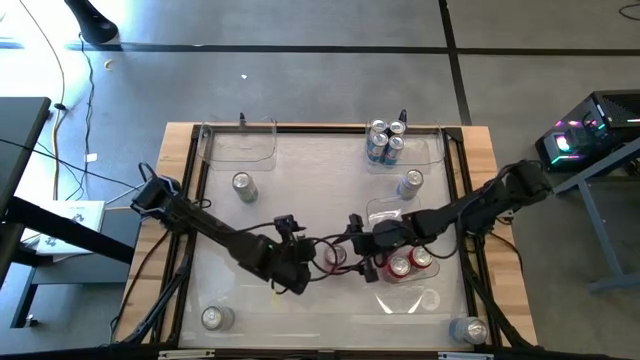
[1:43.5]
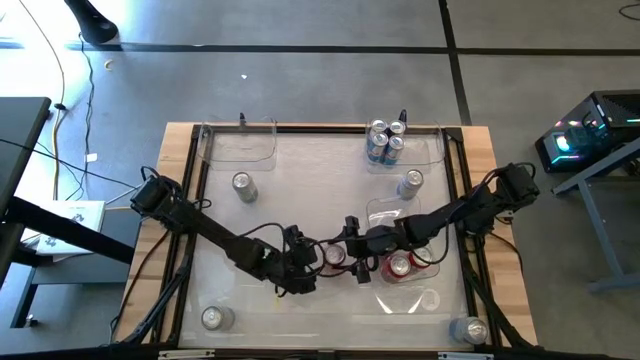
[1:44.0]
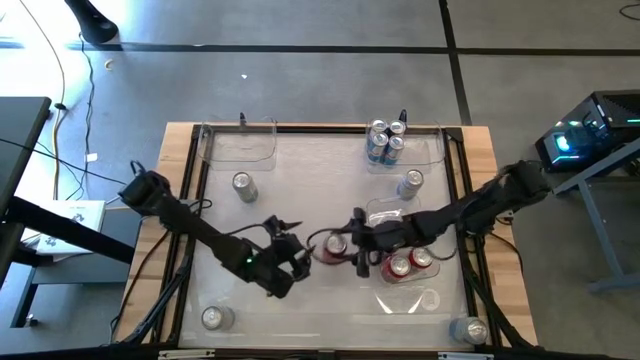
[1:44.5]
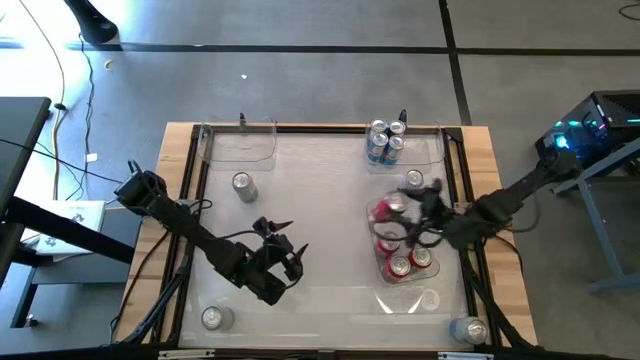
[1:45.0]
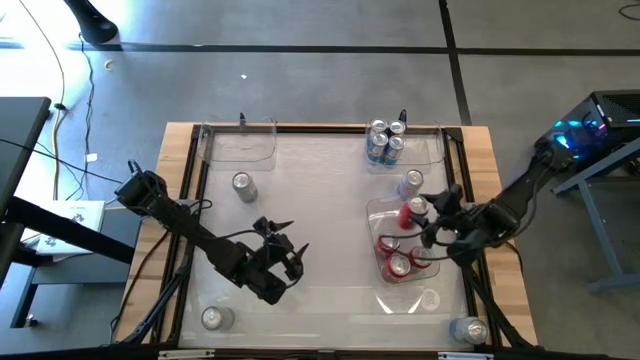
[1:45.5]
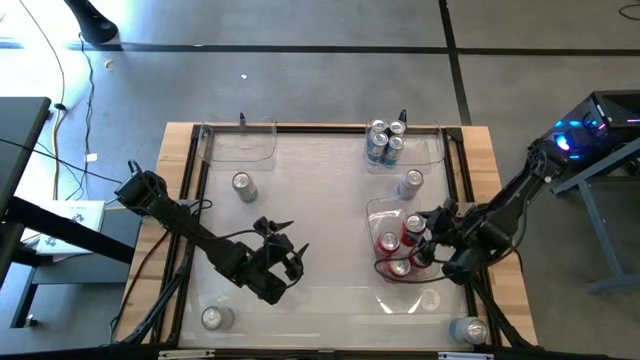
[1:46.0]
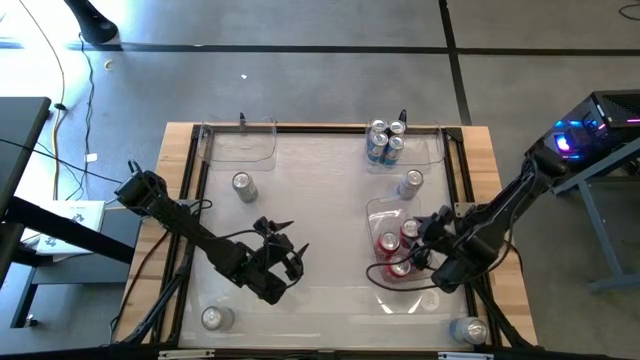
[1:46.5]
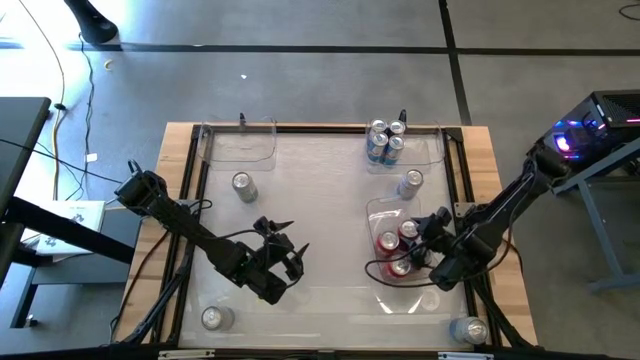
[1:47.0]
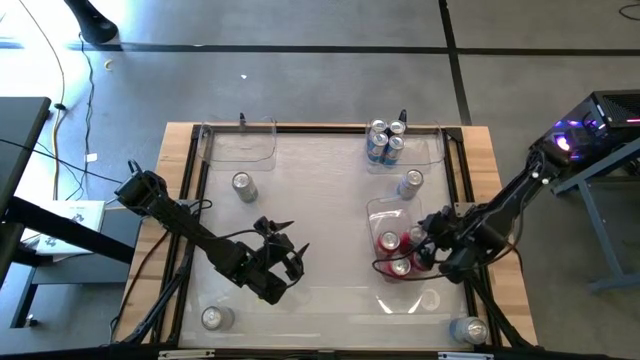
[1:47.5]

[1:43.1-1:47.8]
Task: Sort soda cans
Put the orange soda can back into the bottom right transparent bin

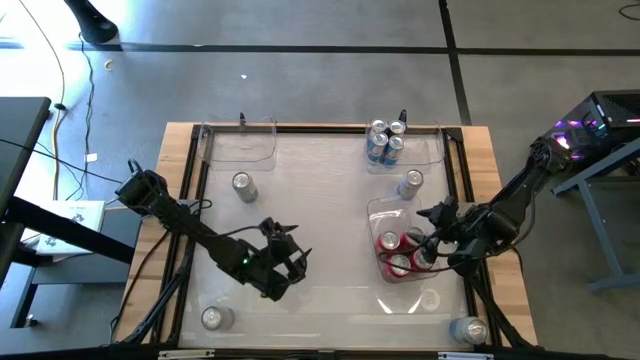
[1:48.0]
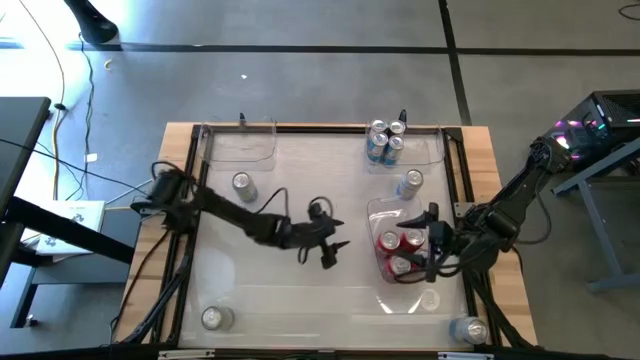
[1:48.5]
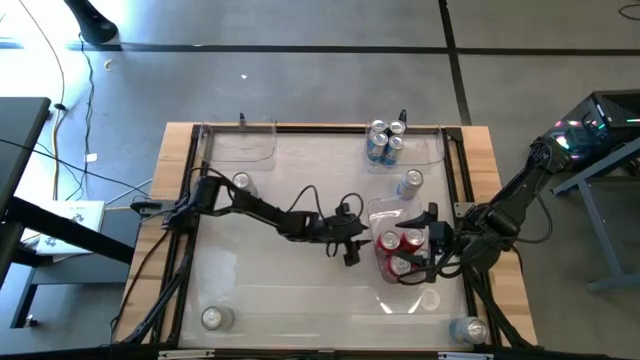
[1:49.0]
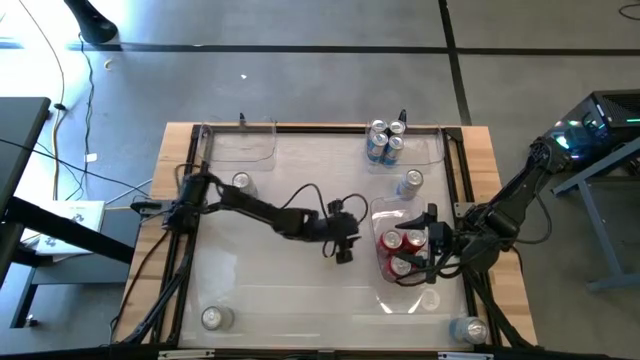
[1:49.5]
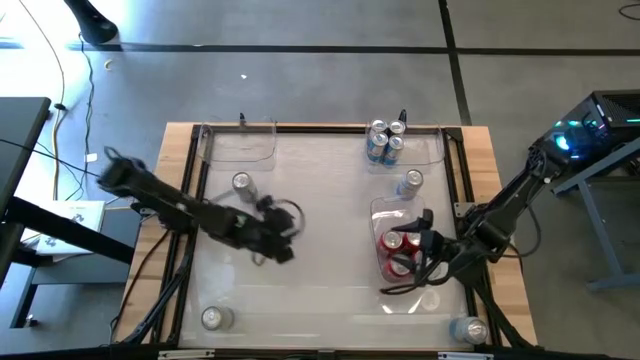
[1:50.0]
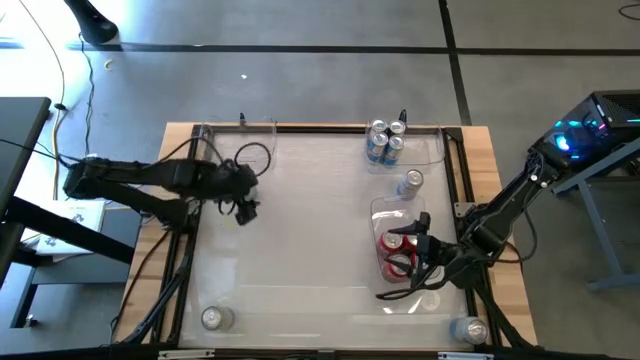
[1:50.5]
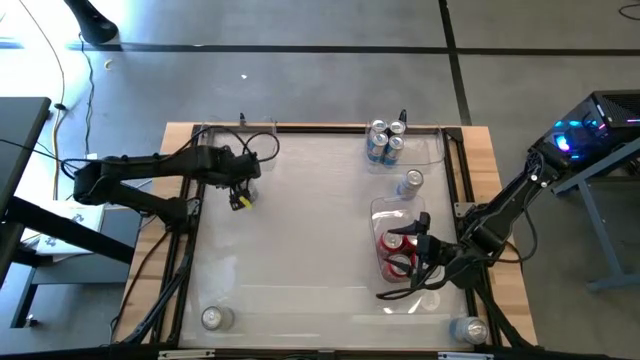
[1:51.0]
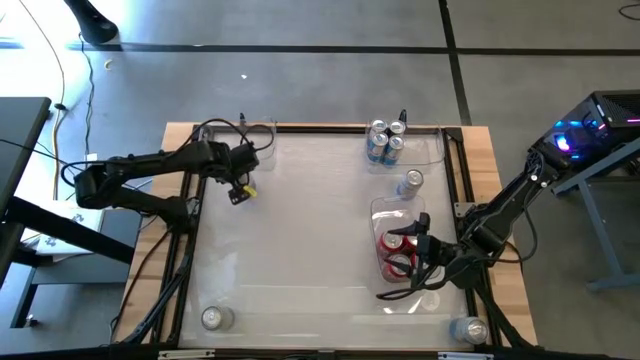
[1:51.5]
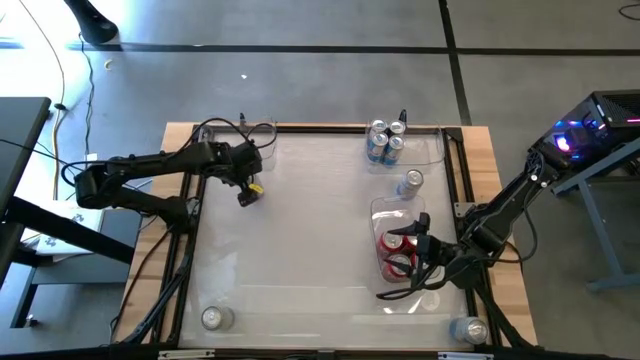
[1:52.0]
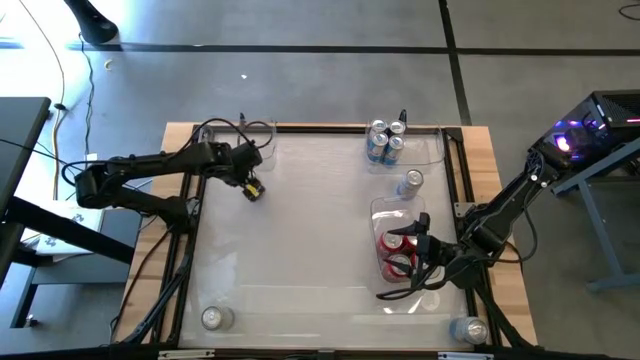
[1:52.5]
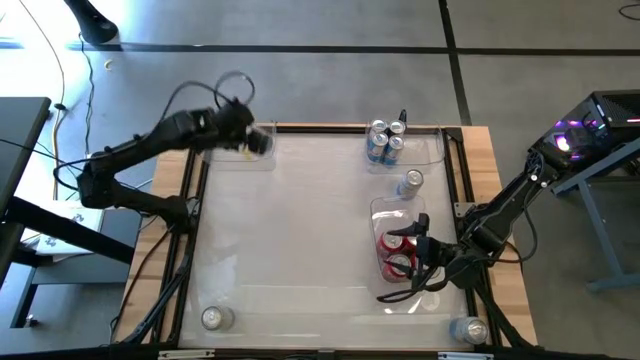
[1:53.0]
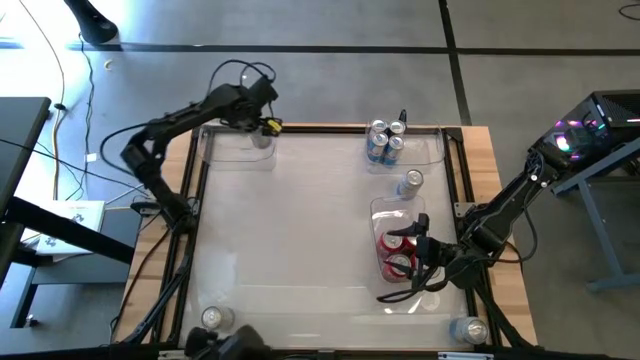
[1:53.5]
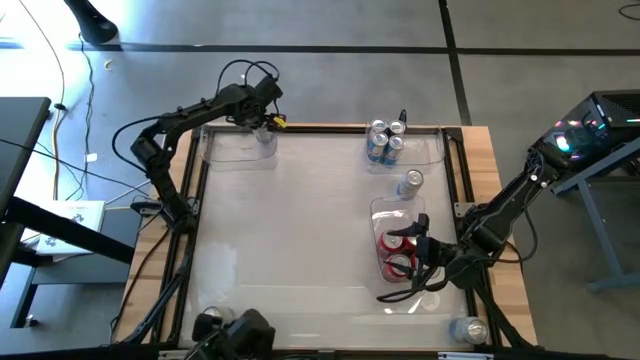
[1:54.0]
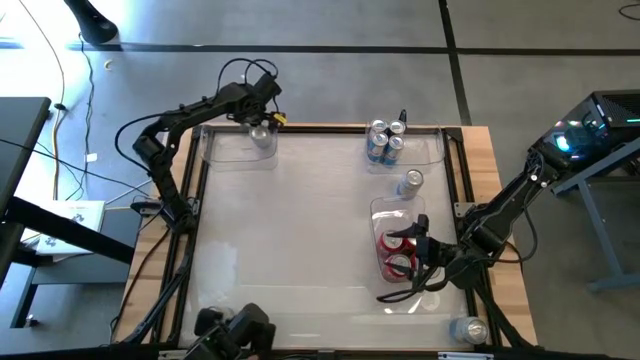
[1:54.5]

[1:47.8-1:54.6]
Put the top left white soda can into the top left transparent bin

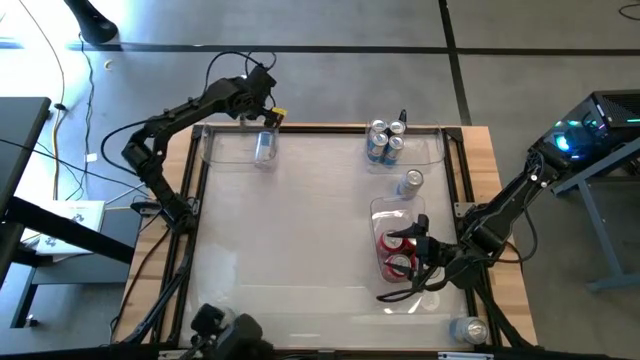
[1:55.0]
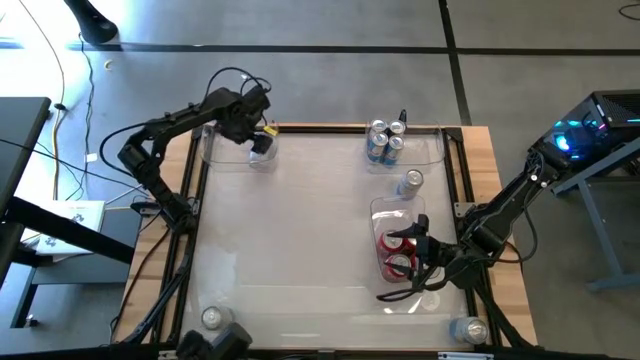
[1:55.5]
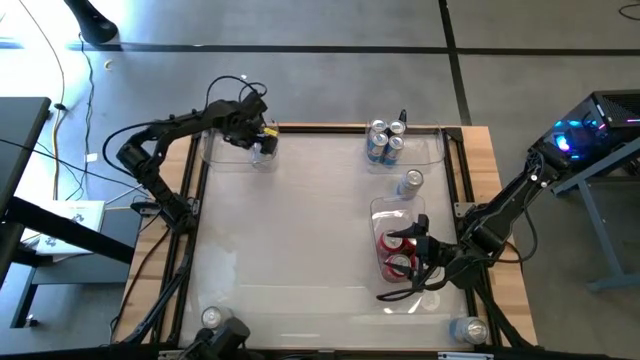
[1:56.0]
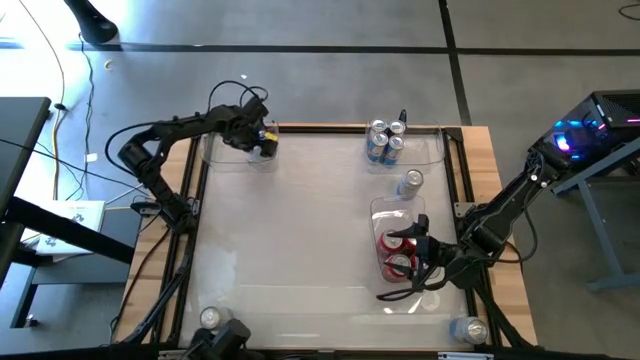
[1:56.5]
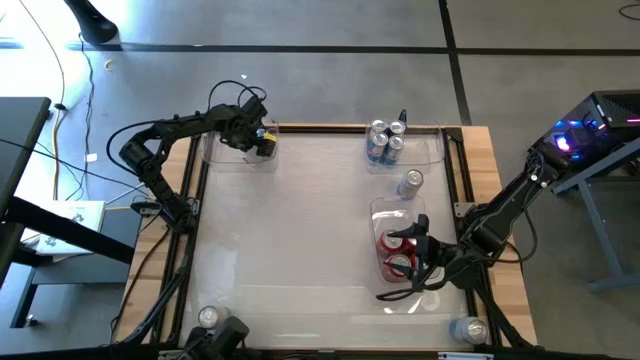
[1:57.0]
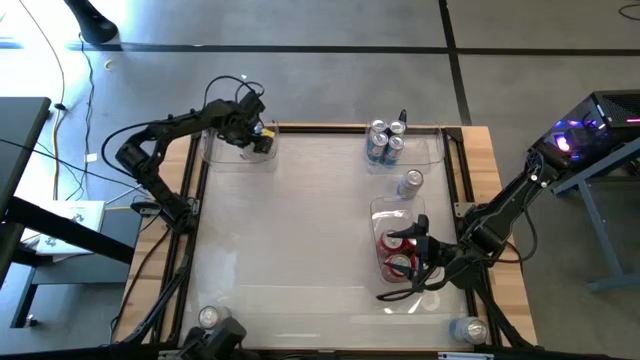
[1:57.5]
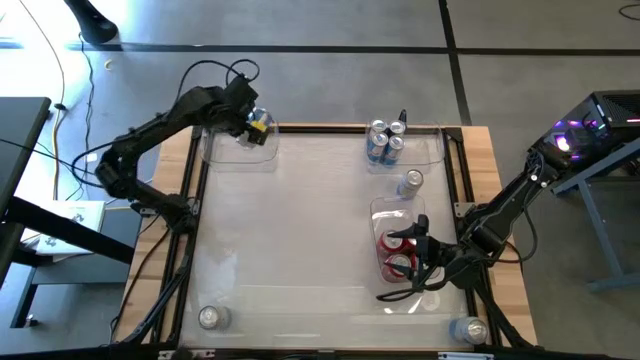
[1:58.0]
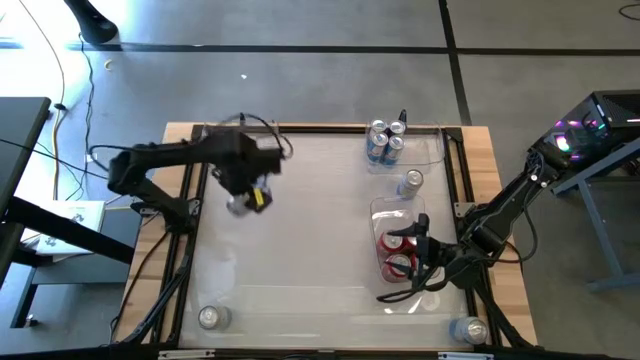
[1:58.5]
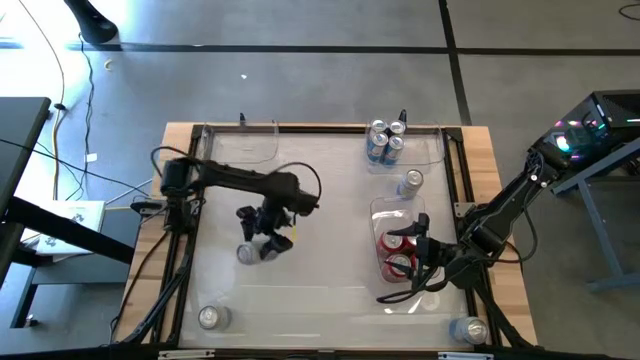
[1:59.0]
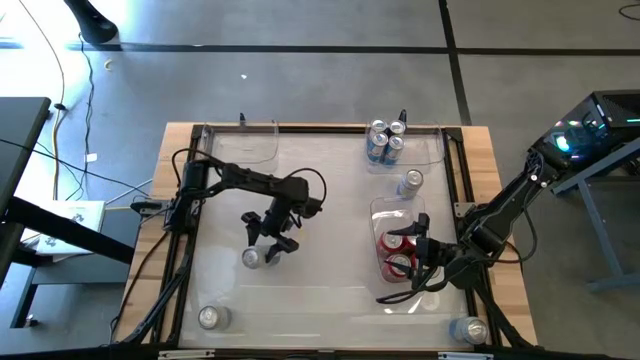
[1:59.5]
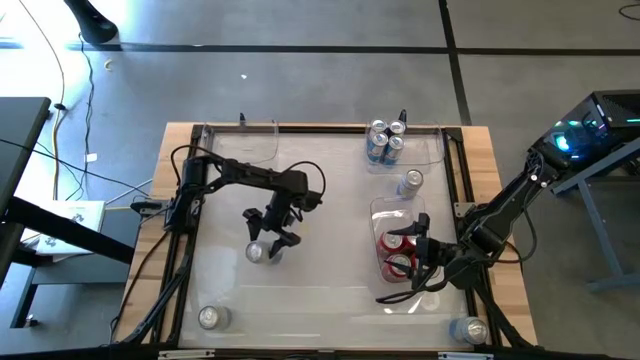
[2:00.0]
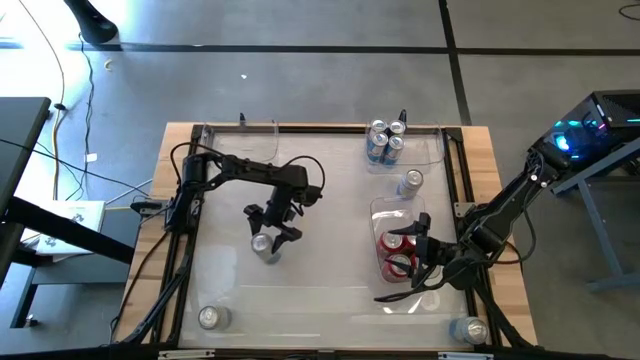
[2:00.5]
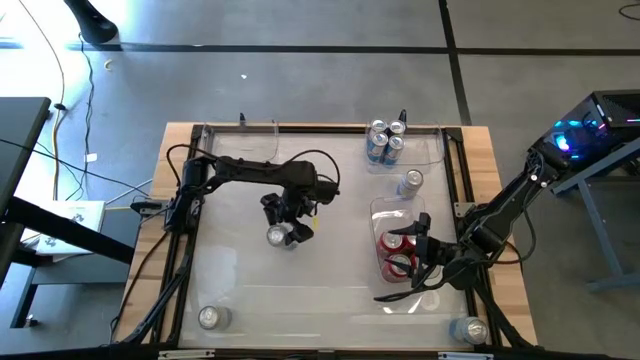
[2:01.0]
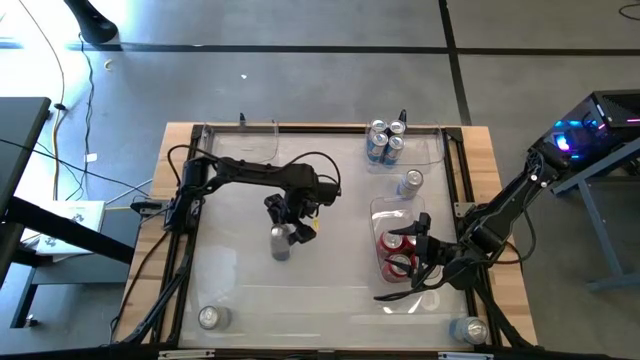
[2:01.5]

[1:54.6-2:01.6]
Remove the white soda can from the top left transparent bin

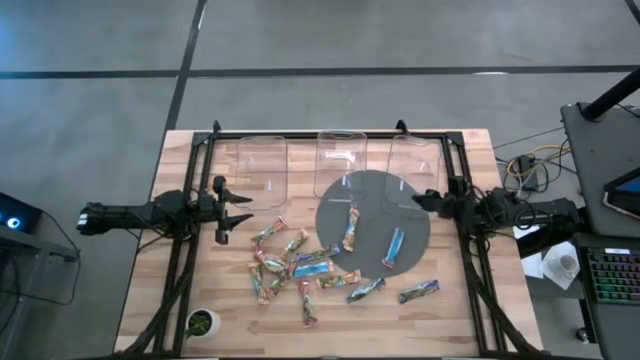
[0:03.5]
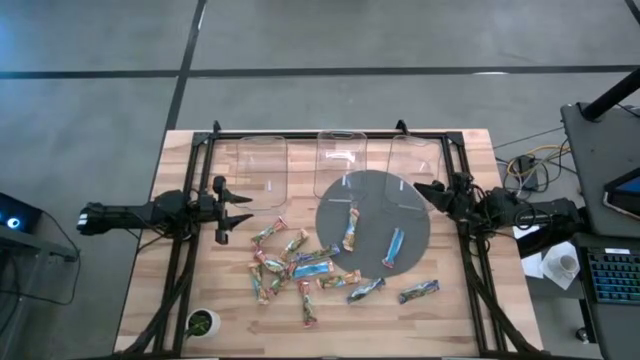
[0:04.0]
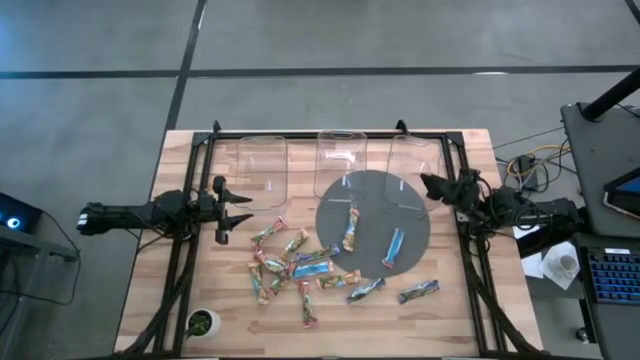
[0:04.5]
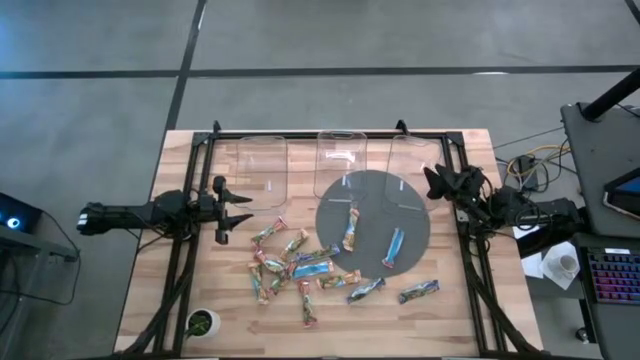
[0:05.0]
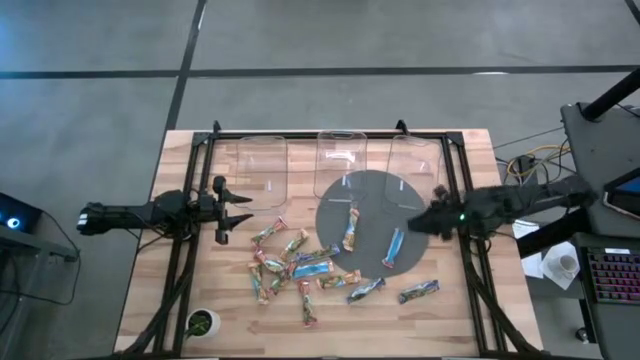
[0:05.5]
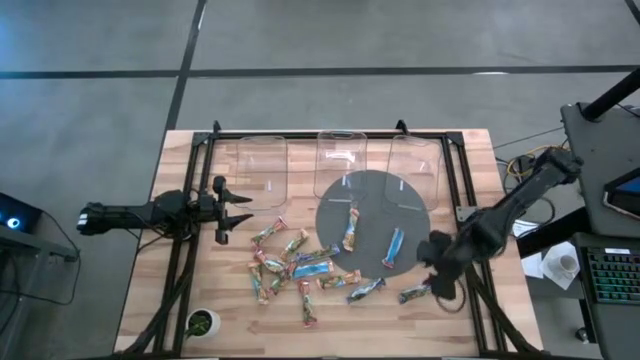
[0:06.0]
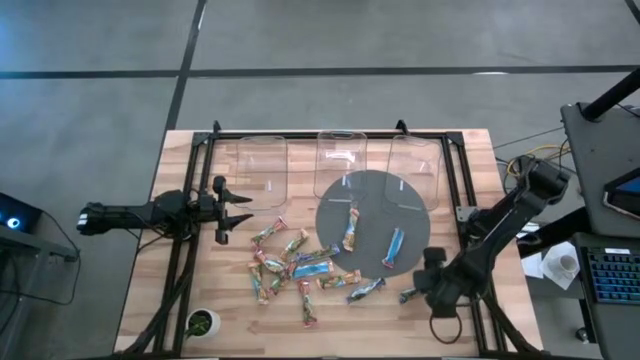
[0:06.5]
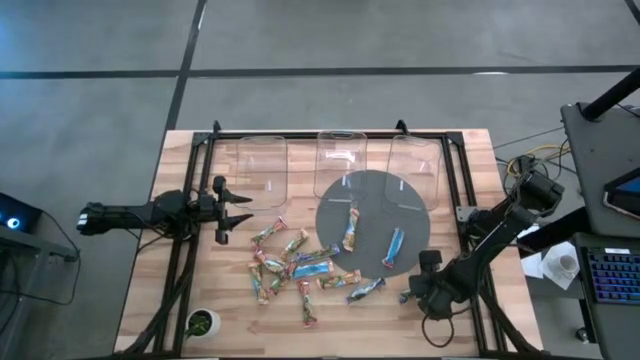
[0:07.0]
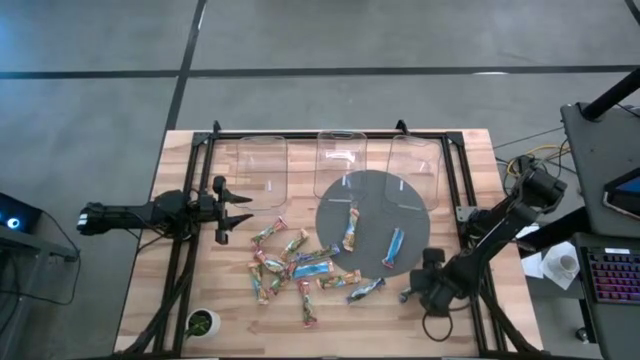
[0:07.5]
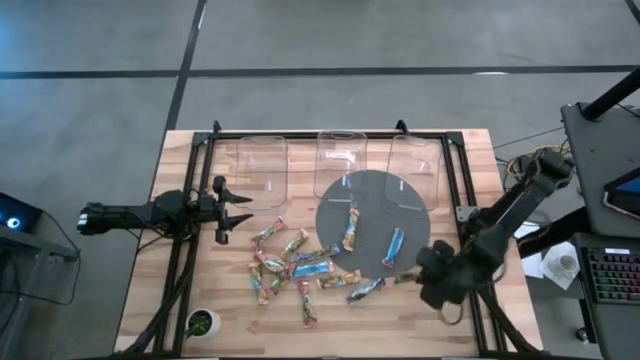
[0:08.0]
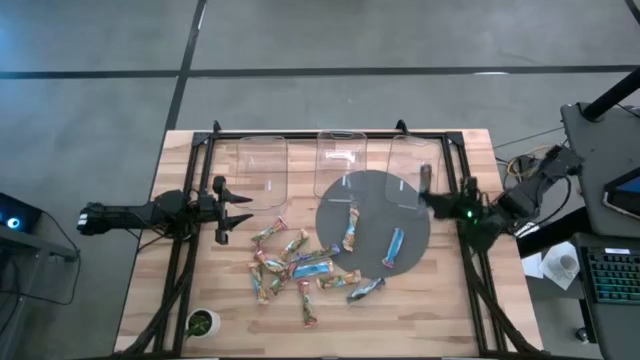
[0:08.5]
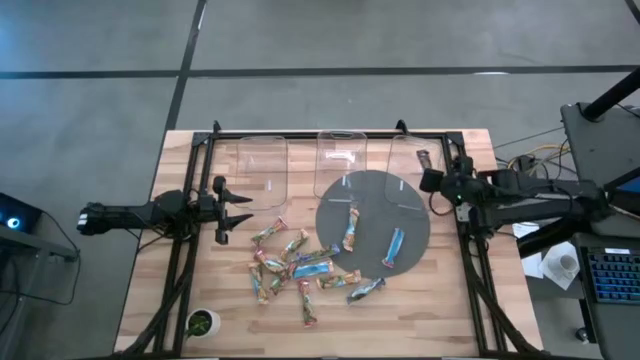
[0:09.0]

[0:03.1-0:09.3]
Task: Pick and place Granola Bars by type
Put the blue granola bar into the right transparent bin
